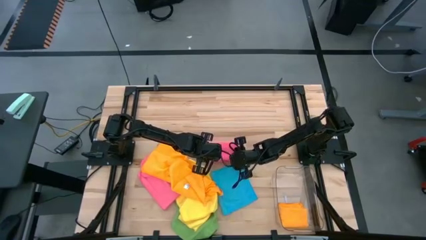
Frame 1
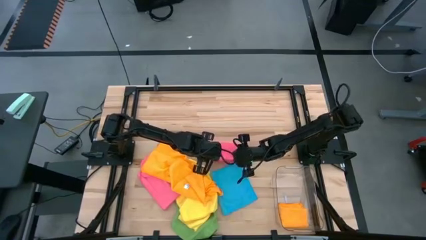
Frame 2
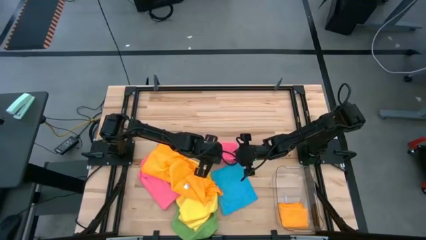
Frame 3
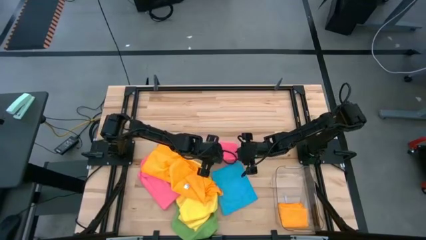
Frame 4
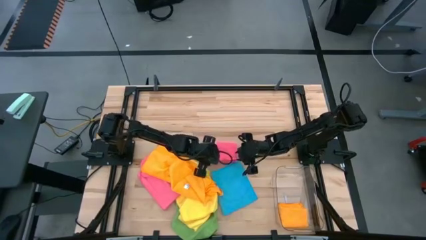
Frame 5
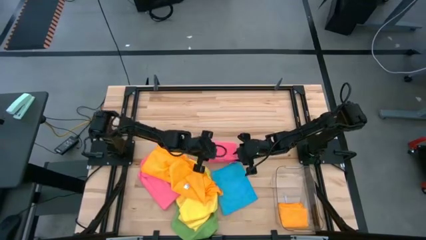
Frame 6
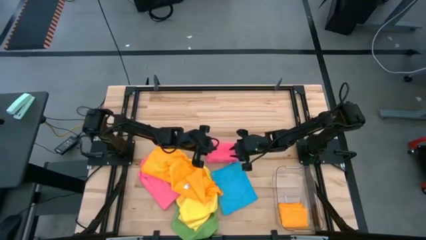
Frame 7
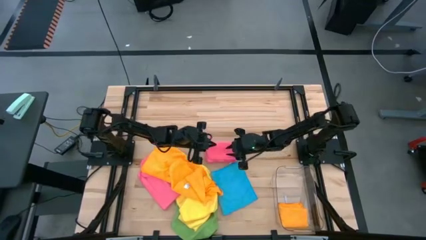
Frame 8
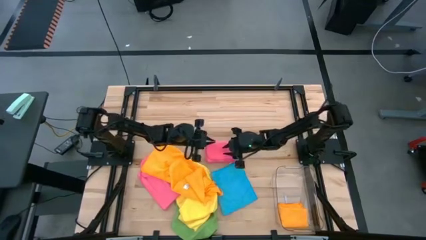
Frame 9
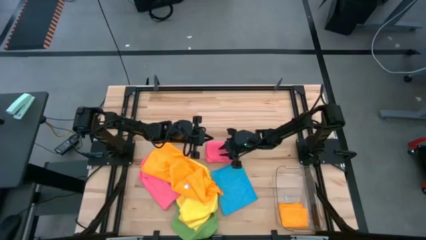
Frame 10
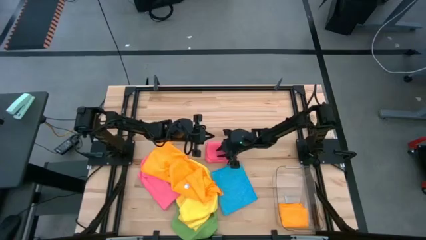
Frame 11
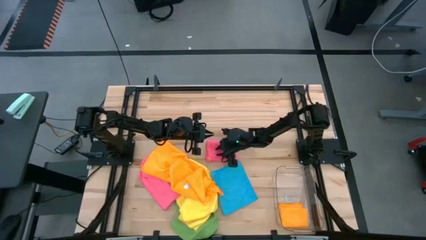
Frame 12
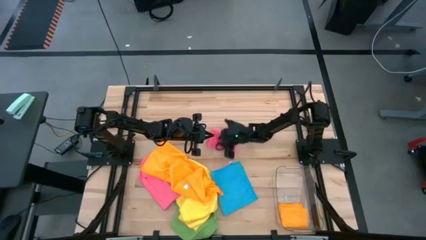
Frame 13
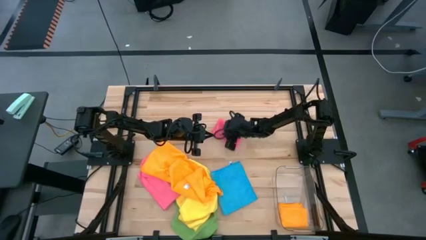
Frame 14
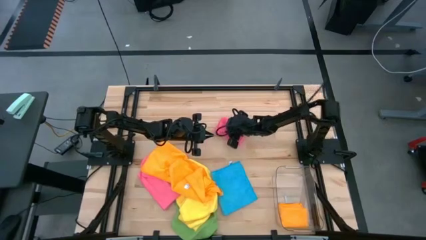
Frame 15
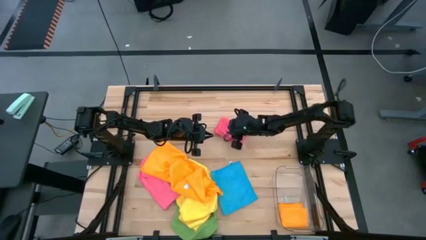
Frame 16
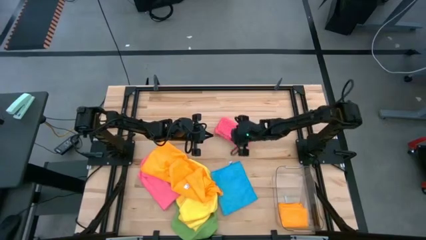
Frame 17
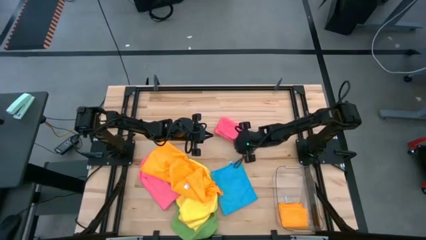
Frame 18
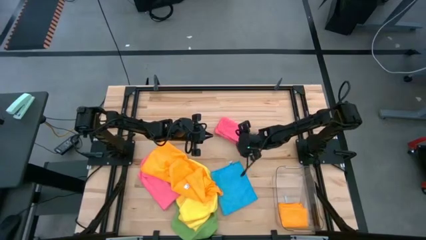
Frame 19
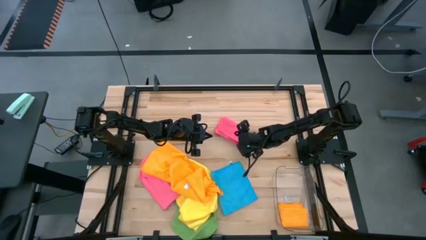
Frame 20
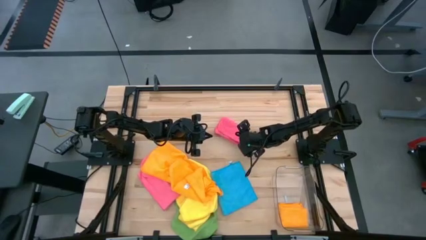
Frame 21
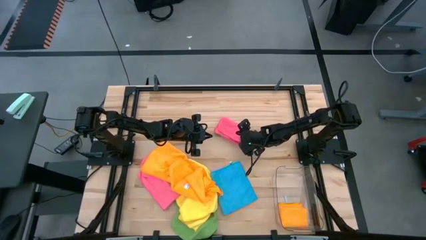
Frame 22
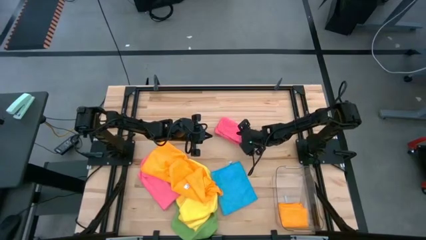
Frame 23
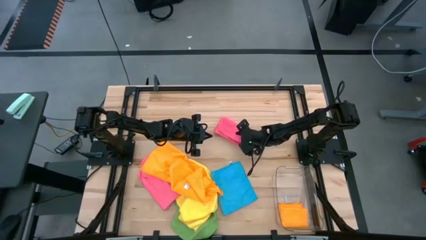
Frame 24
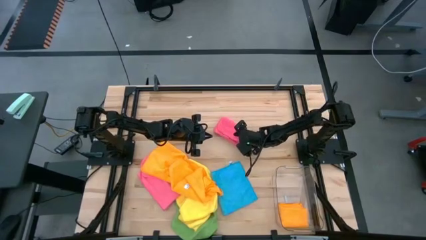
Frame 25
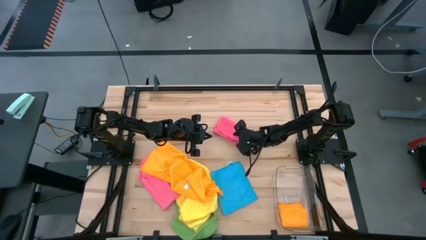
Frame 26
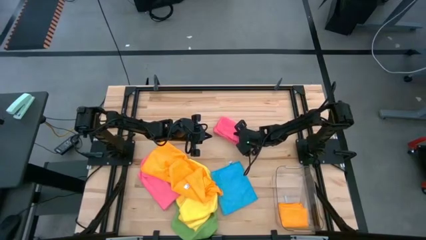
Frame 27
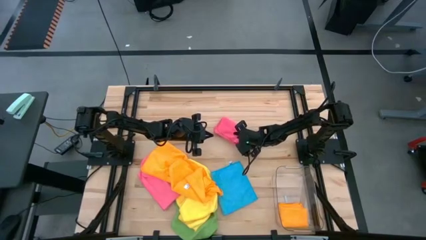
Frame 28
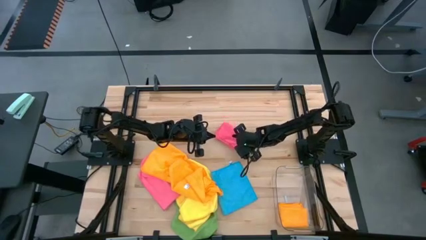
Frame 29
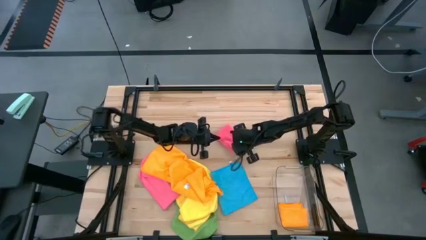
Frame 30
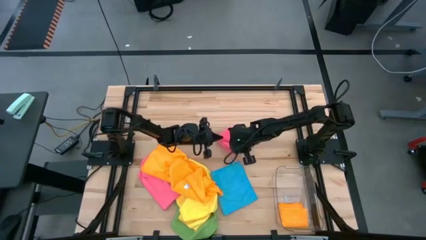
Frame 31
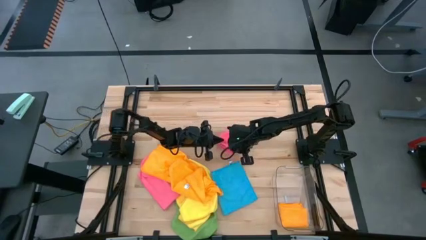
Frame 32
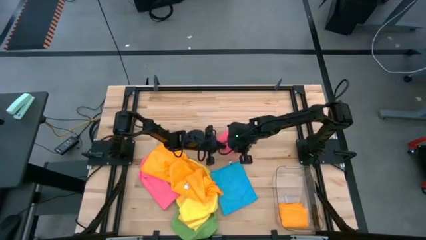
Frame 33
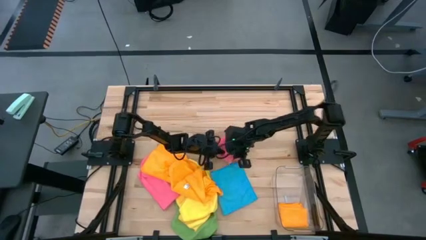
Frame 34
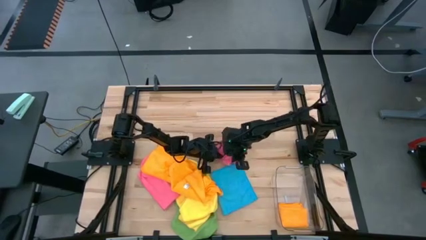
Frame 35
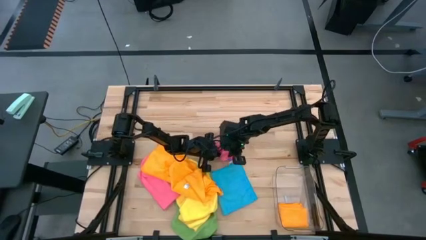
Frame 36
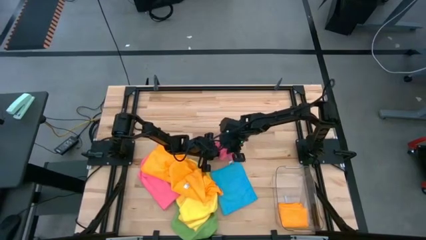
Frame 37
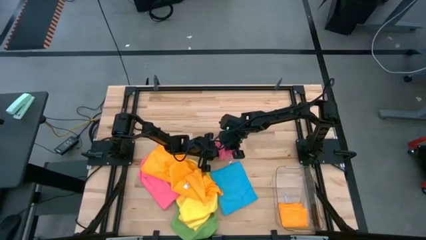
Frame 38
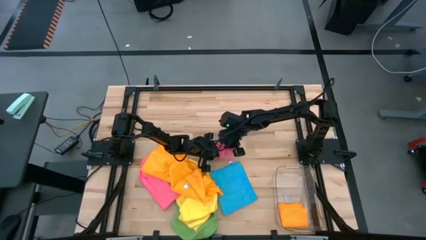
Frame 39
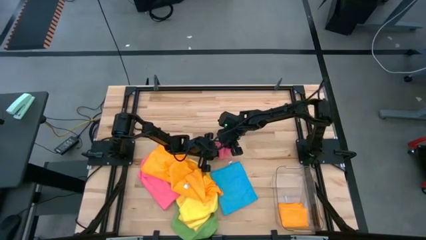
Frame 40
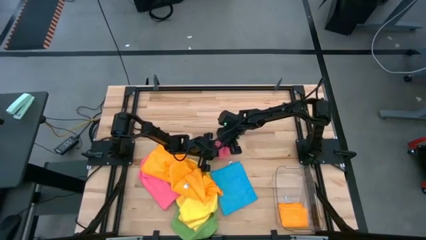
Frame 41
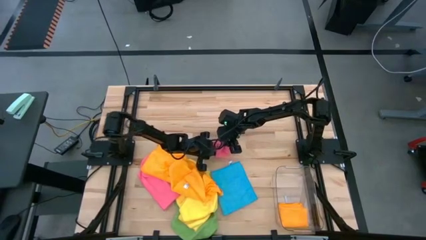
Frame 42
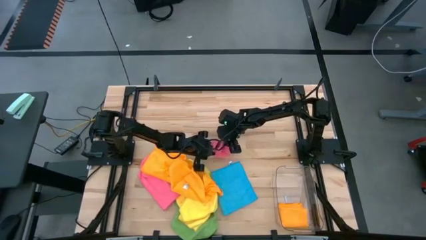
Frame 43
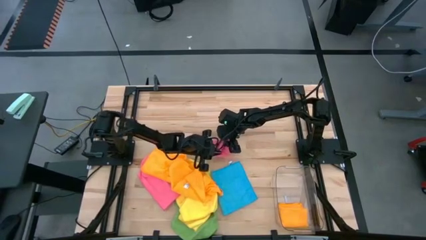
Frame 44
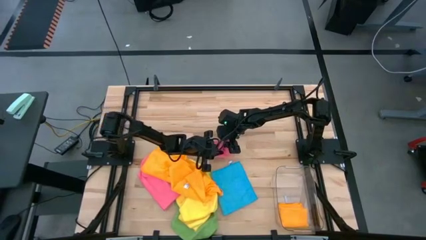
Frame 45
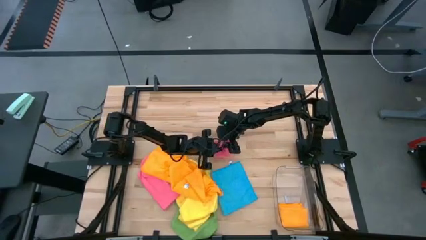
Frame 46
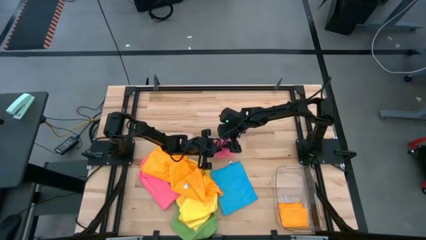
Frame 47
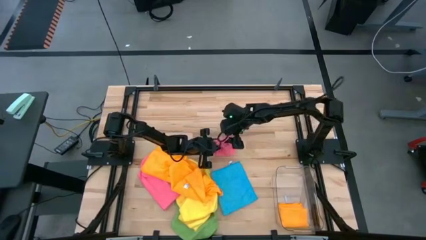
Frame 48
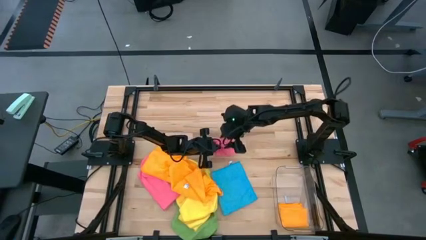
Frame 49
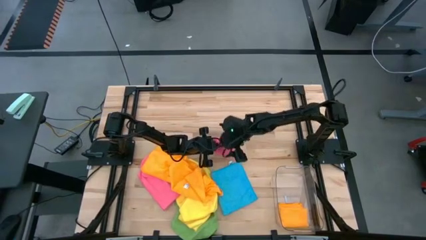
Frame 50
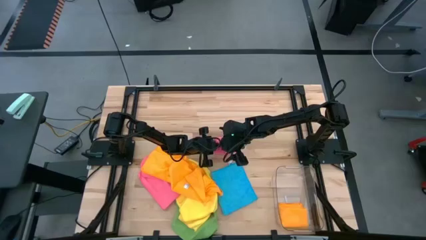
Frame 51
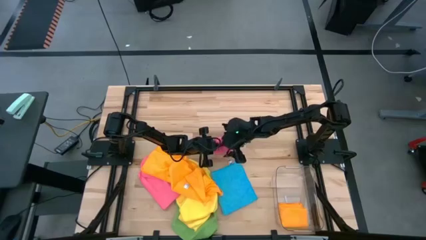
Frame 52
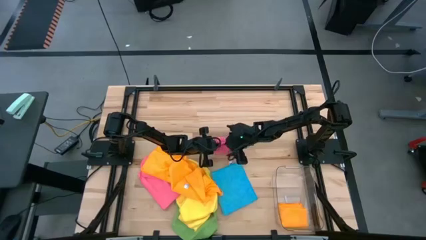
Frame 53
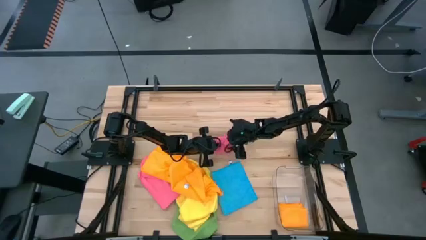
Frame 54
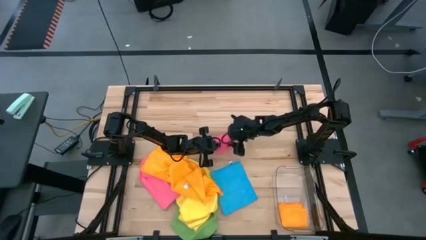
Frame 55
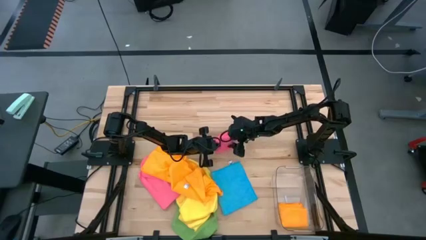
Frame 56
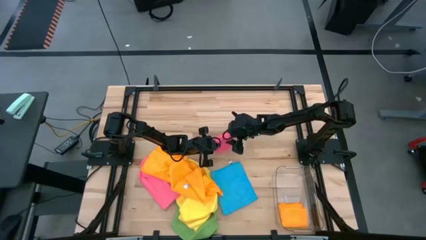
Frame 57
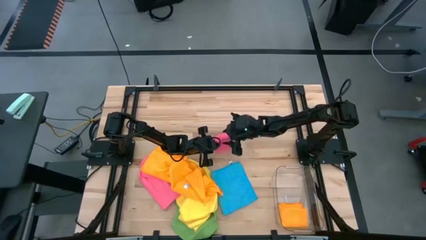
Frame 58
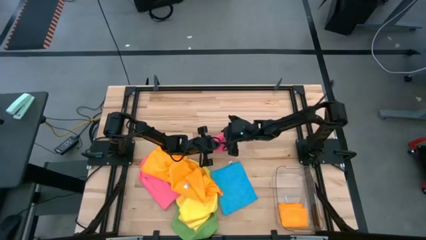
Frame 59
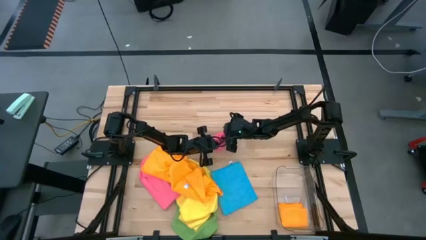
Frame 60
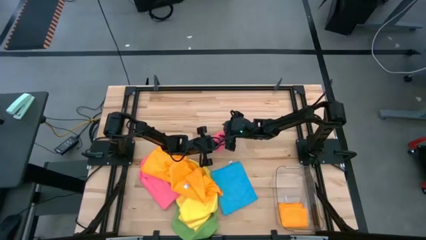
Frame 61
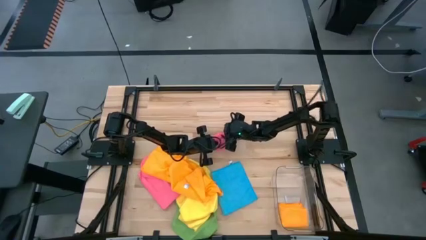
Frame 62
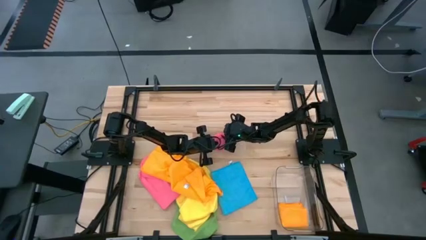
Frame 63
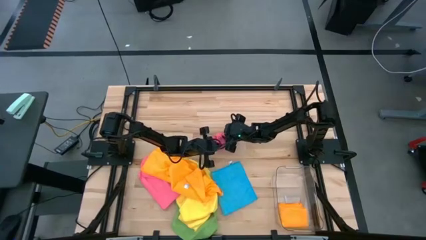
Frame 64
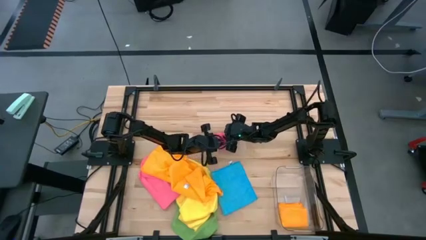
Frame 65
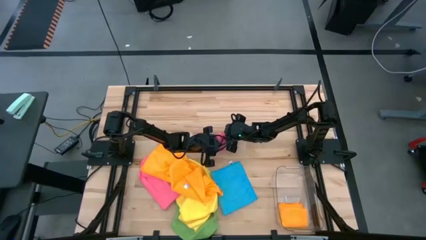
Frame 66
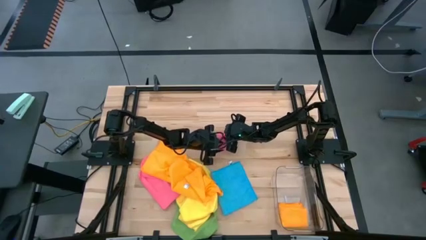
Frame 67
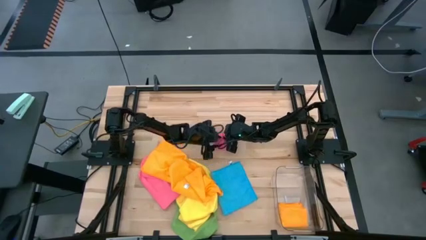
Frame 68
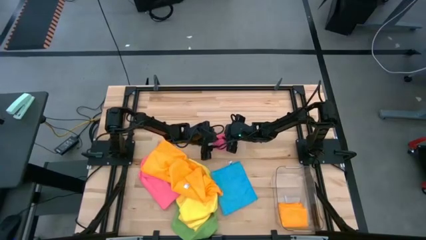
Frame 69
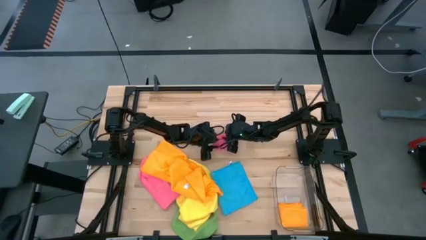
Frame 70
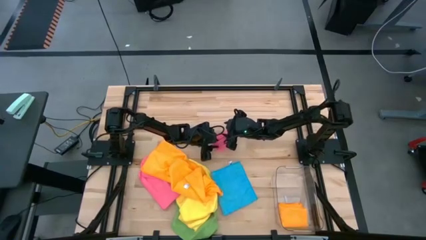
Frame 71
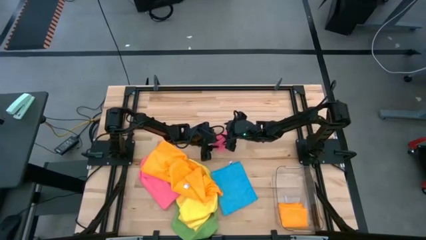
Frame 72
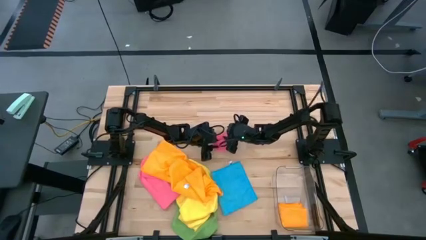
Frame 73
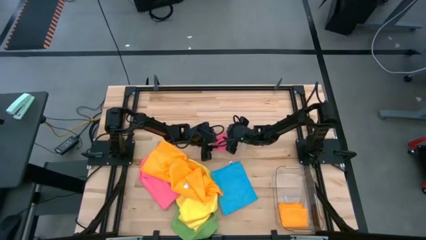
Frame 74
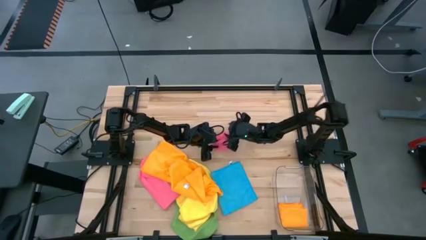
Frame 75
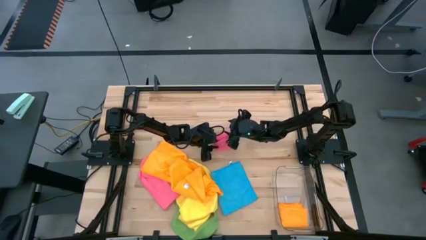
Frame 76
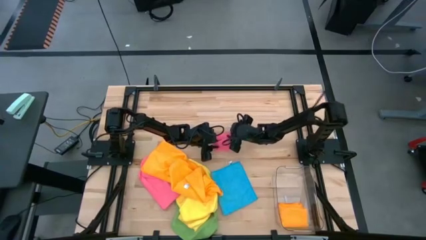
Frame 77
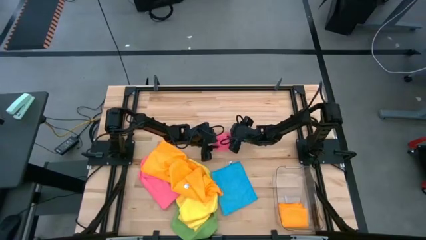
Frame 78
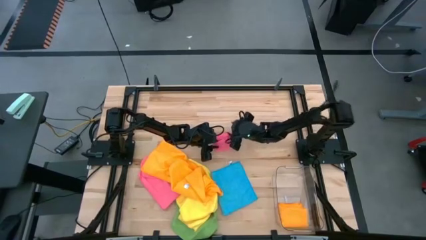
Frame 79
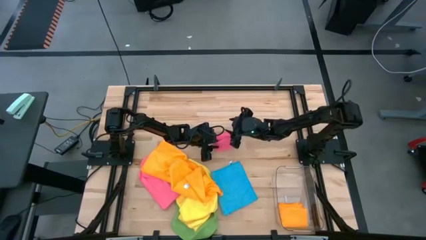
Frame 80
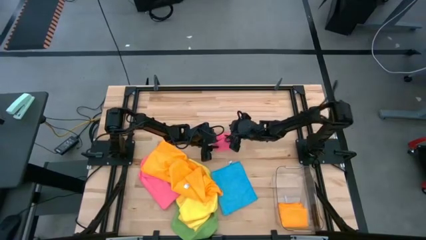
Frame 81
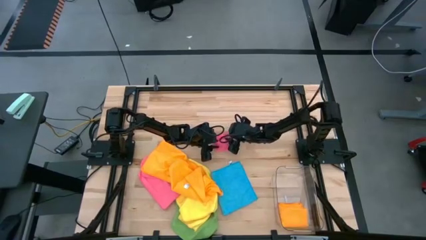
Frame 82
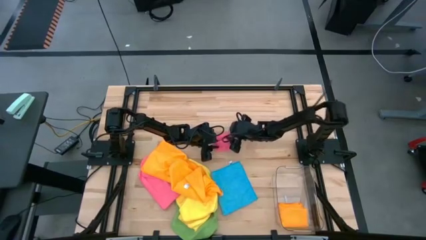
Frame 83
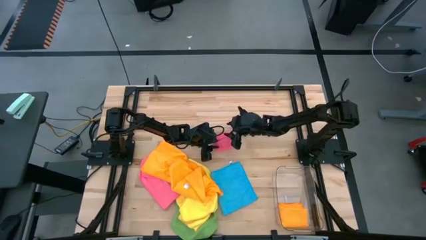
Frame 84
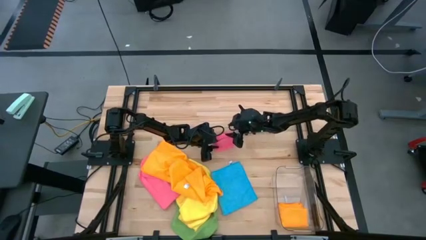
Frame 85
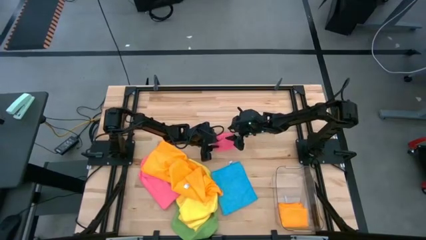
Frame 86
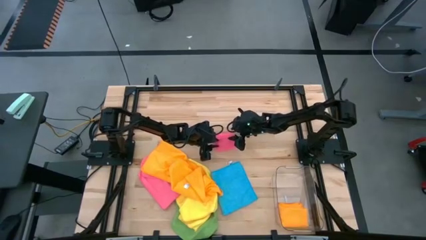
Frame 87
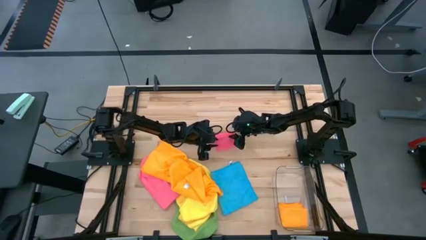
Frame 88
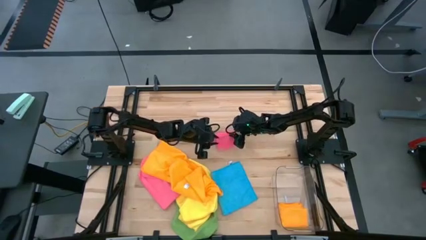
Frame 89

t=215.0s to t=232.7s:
Task: Fold microfiber towels
Fold the pink towel
